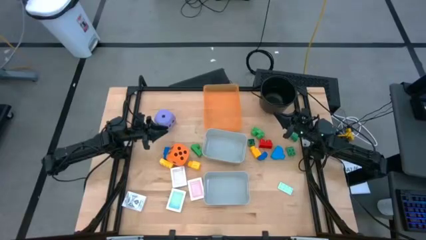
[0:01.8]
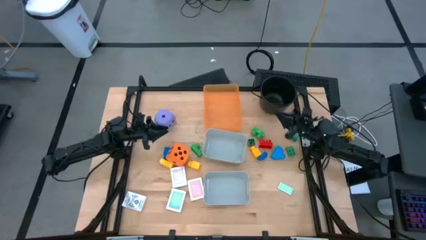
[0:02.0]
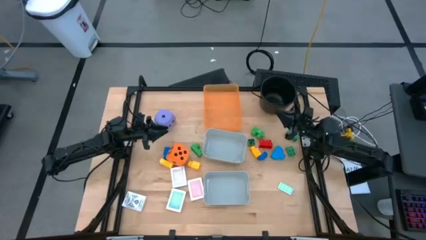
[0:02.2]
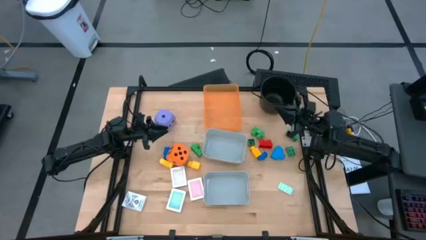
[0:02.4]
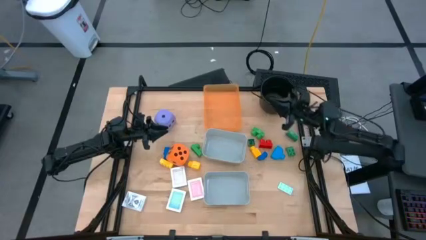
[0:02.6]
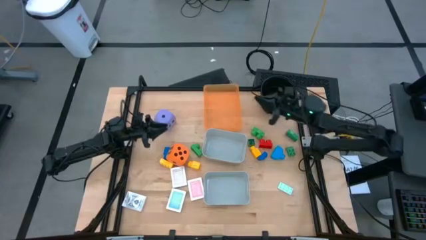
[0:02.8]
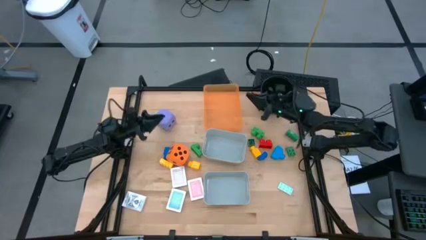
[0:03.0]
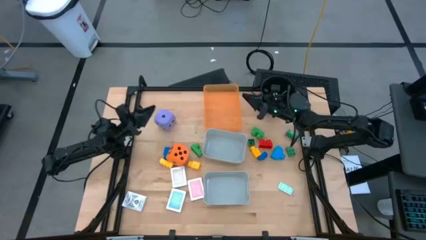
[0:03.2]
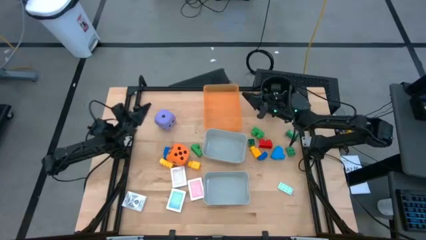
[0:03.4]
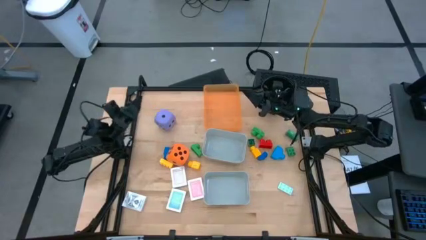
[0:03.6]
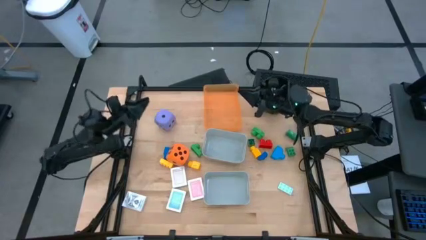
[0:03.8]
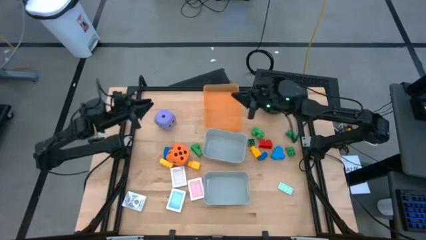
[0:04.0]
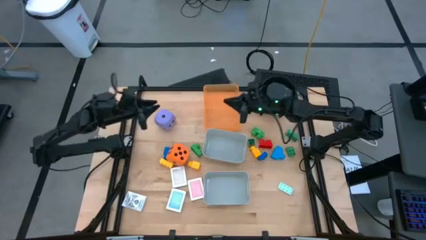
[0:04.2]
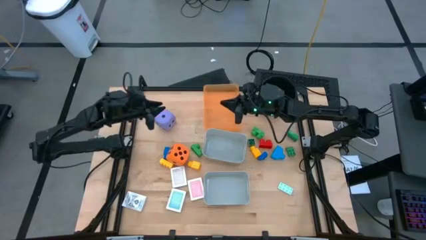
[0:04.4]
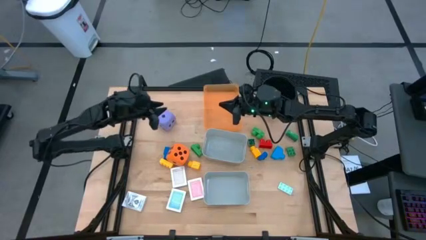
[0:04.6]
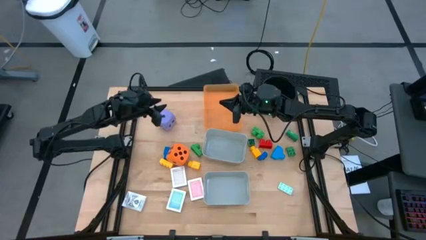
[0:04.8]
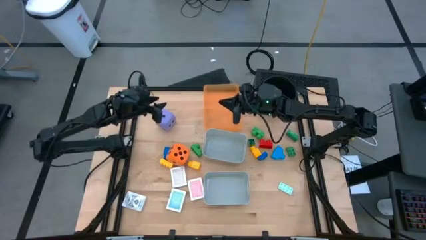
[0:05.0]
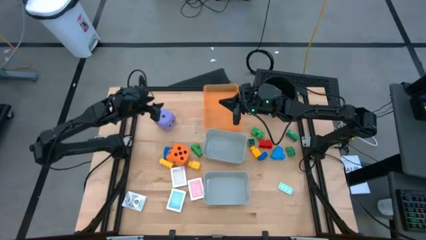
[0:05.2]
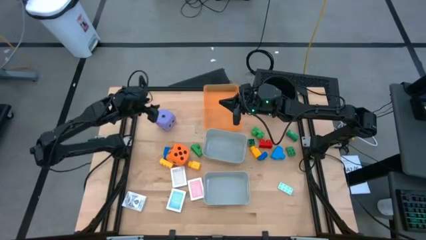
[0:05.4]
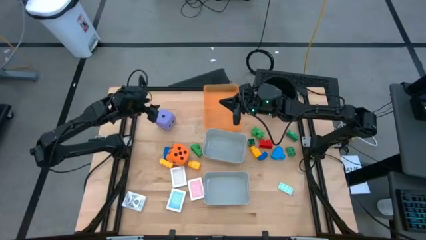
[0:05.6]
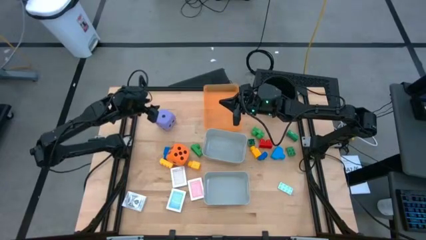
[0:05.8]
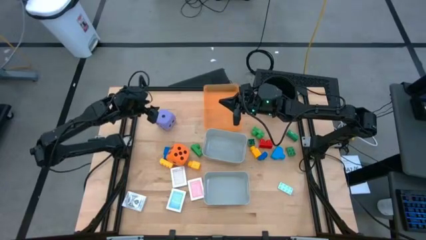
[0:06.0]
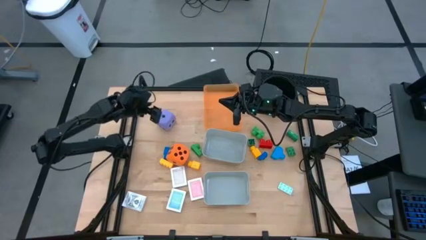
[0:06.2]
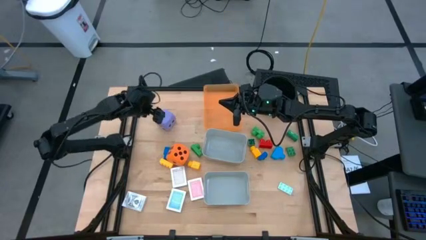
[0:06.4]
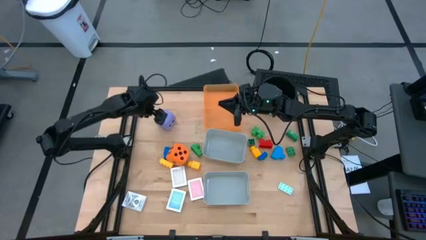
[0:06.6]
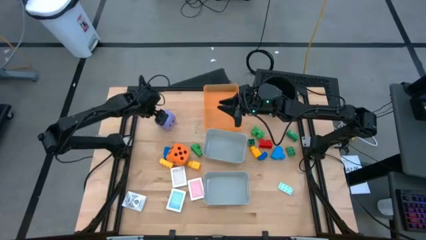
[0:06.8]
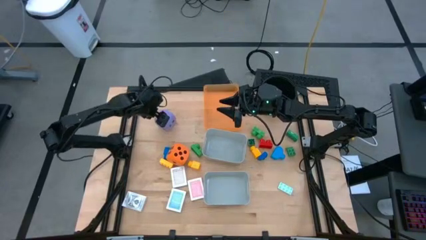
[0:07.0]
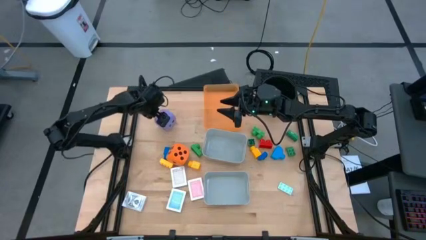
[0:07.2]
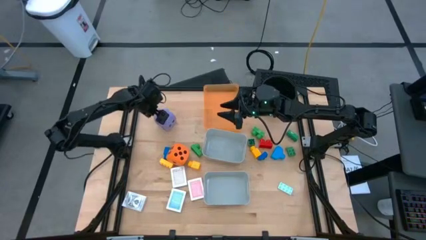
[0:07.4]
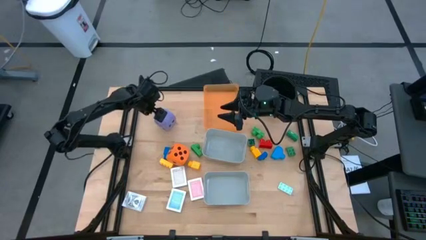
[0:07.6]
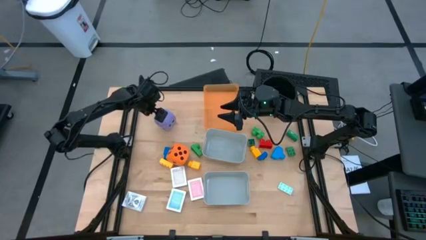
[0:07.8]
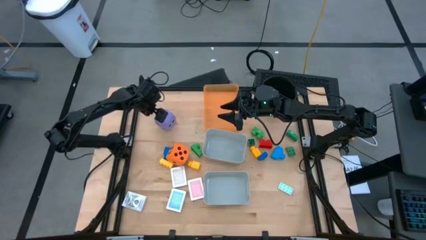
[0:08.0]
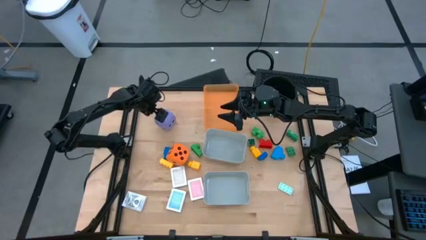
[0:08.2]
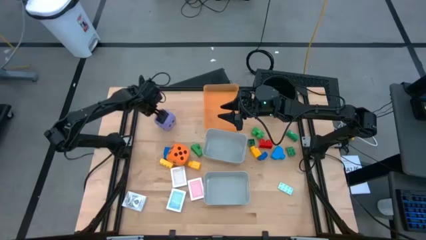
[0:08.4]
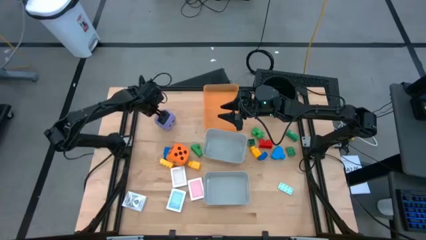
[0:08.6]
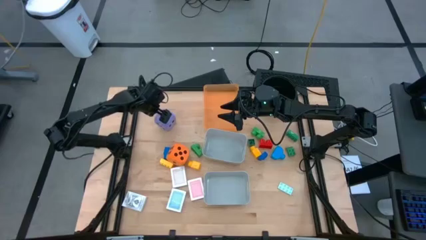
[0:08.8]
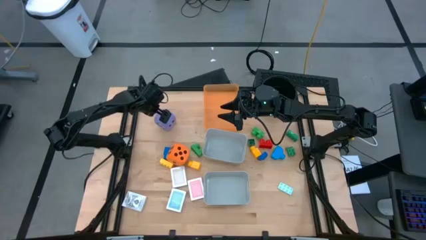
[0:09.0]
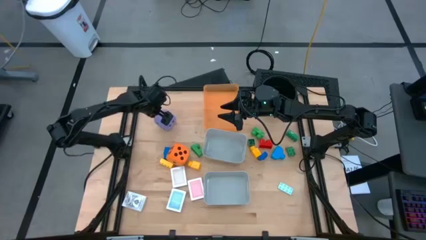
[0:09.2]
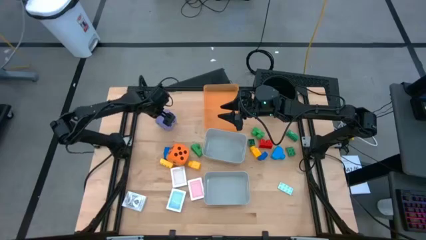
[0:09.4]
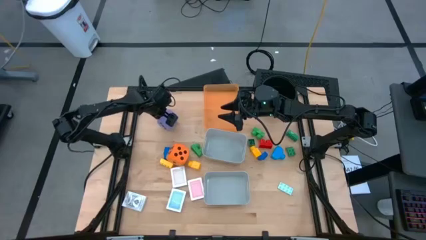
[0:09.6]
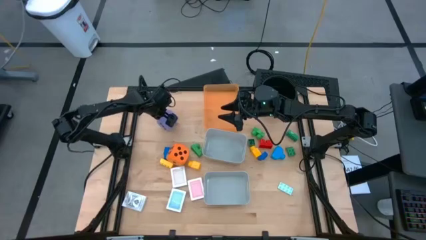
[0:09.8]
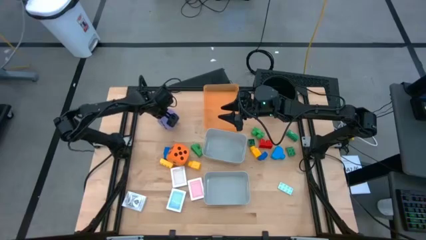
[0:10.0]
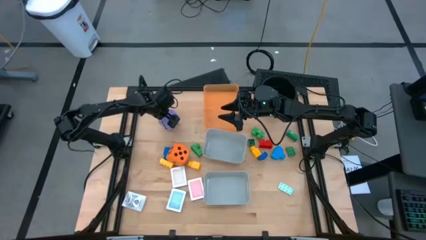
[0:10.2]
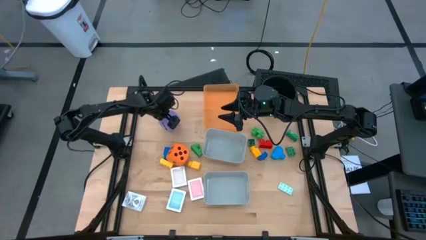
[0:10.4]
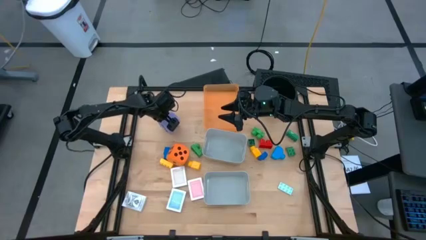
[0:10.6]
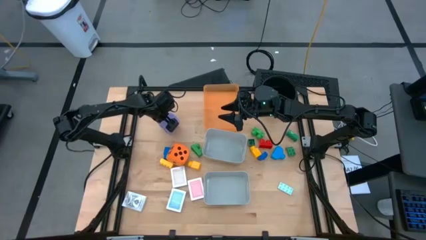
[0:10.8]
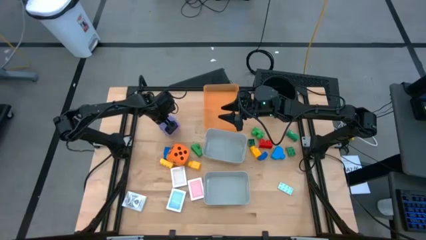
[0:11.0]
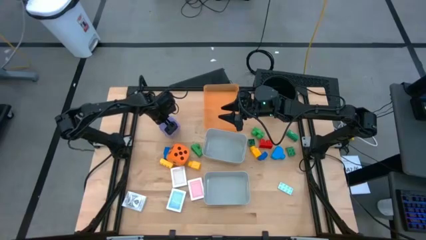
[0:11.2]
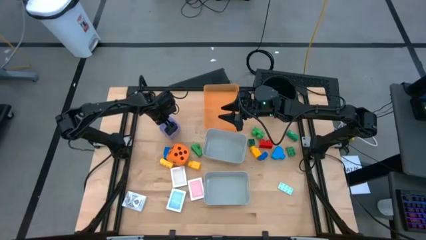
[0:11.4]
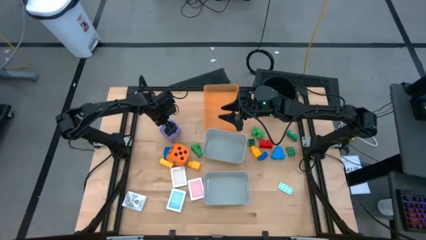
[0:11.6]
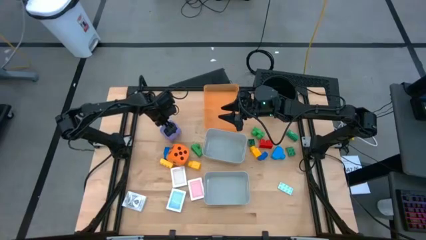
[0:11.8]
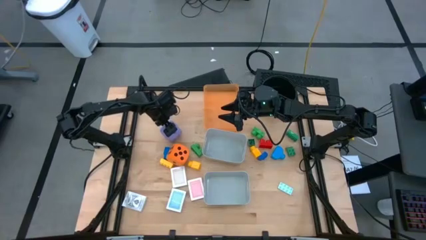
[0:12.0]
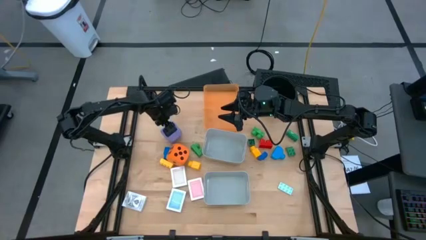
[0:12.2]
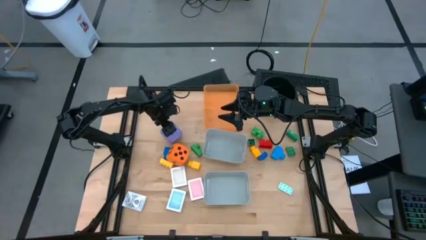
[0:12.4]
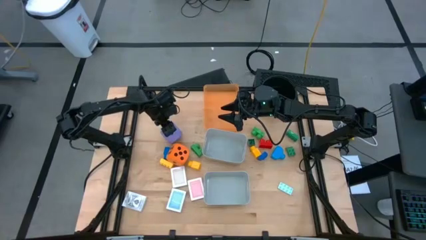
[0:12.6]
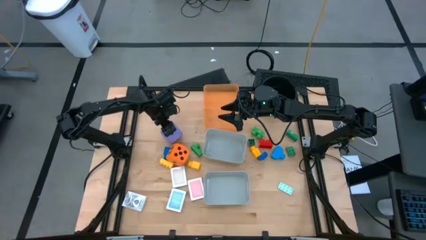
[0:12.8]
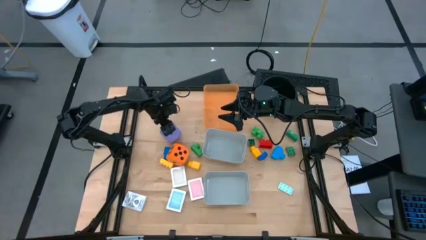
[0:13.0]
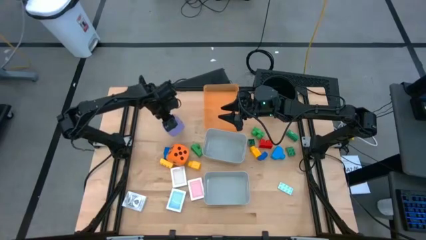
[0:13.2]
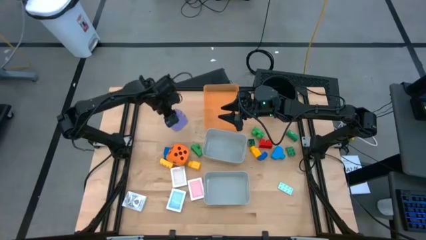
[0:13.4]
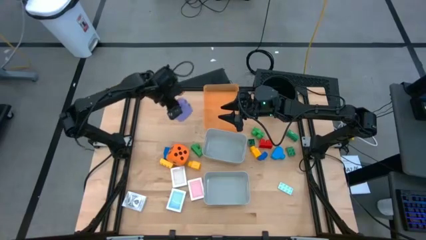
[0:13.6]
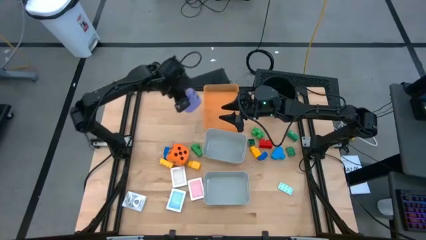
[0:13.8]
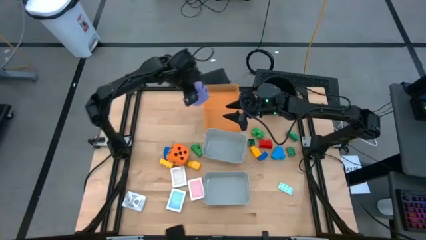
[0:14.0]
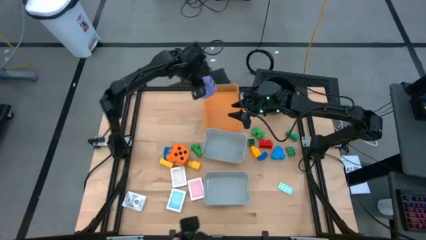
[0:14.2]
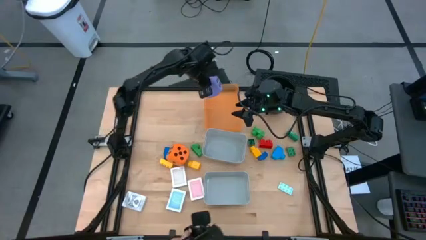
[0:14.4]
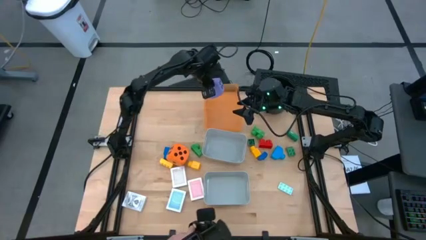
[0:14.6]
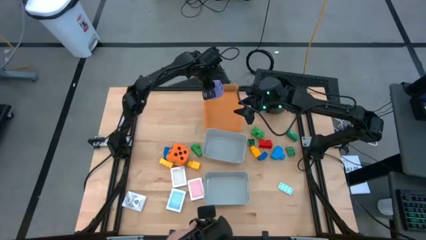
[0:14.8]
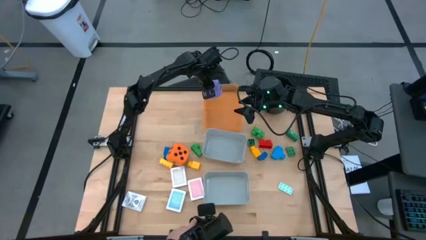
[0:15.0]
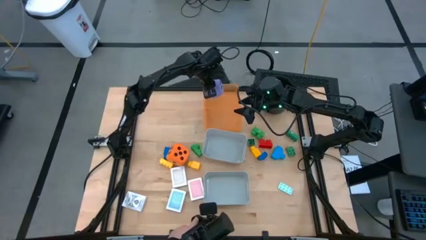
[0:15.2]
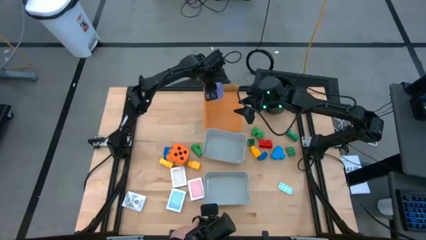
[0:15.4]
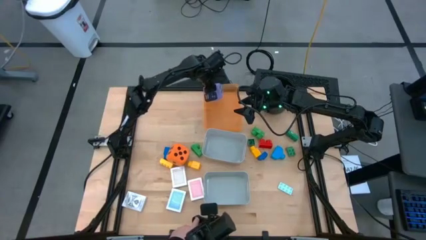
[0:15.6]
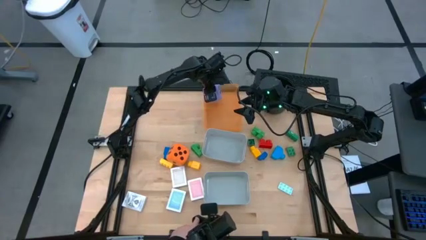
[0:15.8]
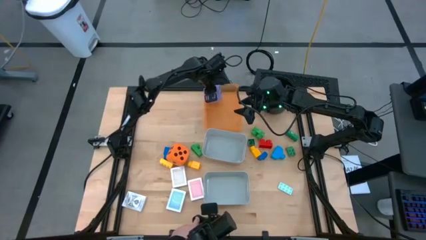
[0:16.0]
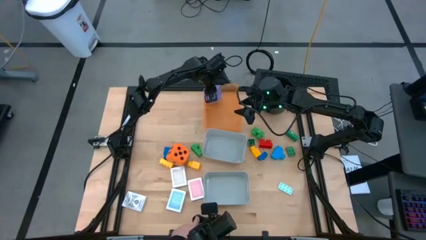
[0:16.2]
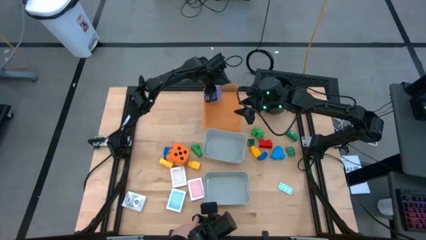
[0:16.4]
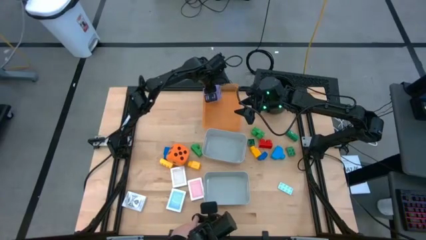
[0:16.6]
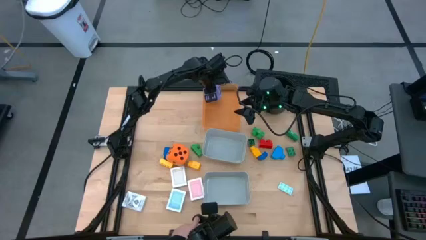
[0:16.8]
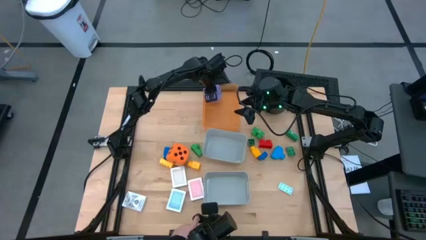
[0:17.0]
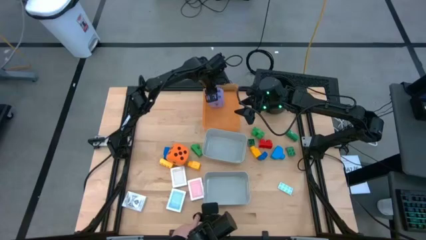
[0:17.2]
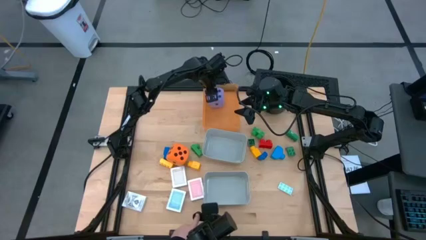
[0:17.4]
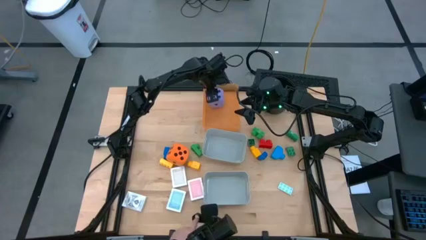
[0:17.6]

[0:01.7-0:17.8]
Task: Pick & Place Toys
Put the purple dice into the orange bin
